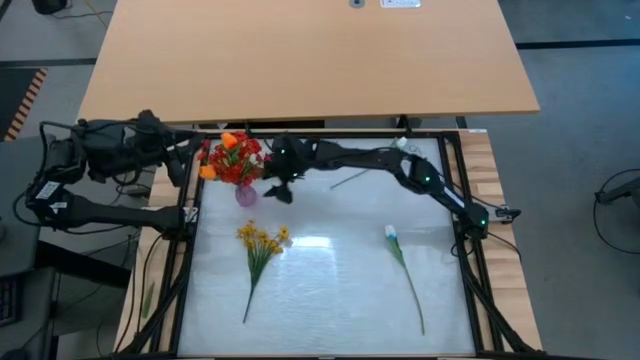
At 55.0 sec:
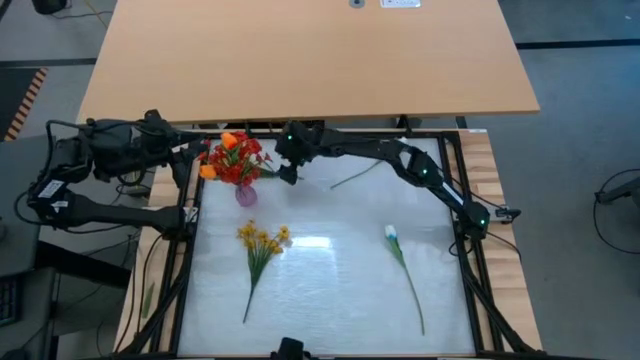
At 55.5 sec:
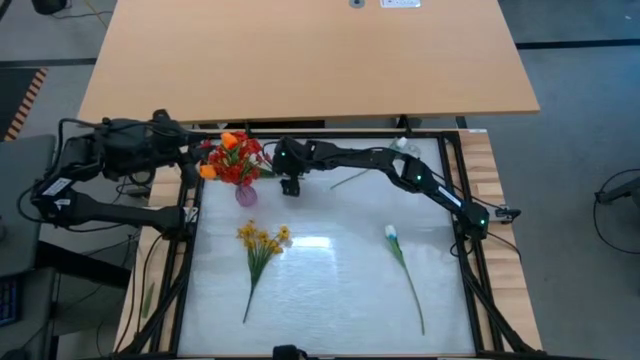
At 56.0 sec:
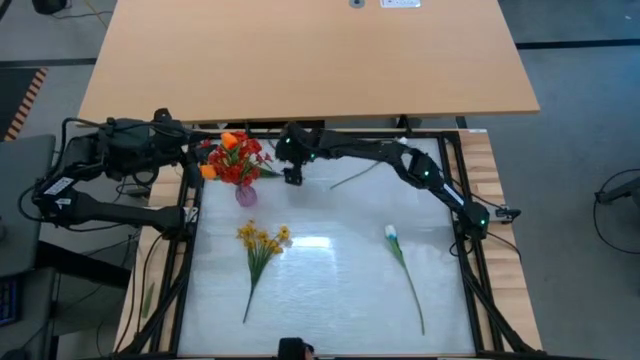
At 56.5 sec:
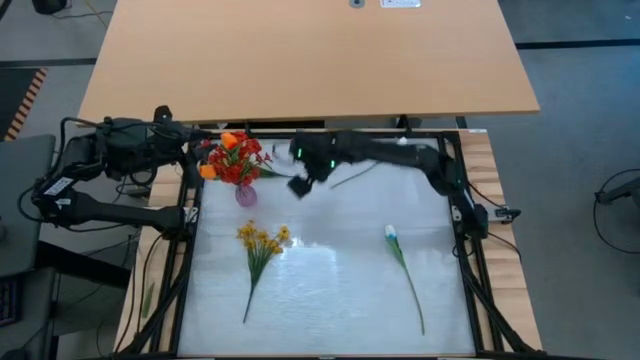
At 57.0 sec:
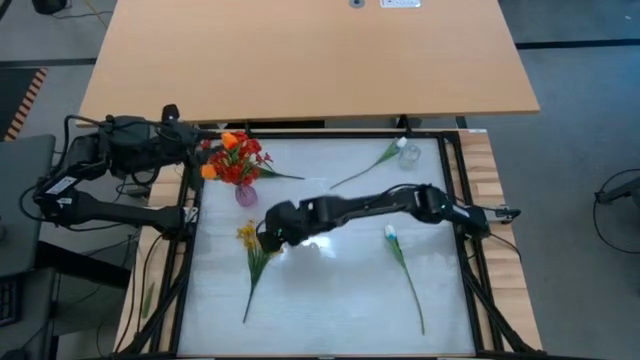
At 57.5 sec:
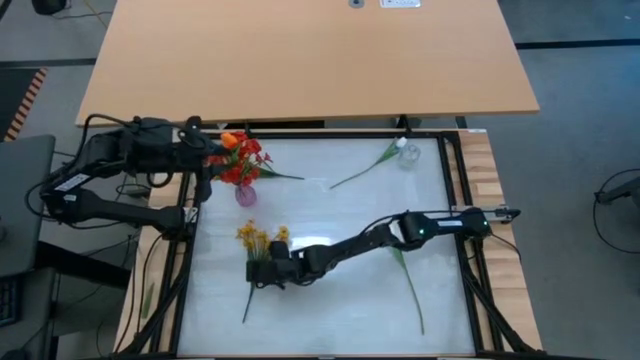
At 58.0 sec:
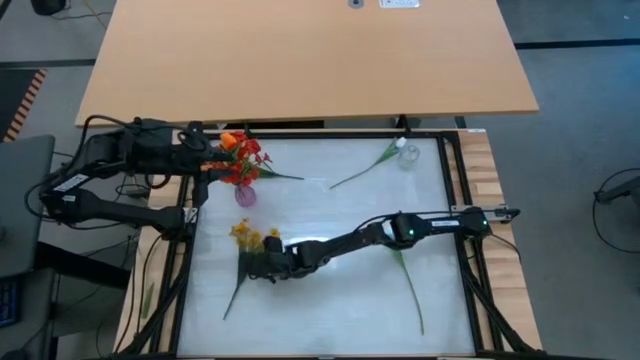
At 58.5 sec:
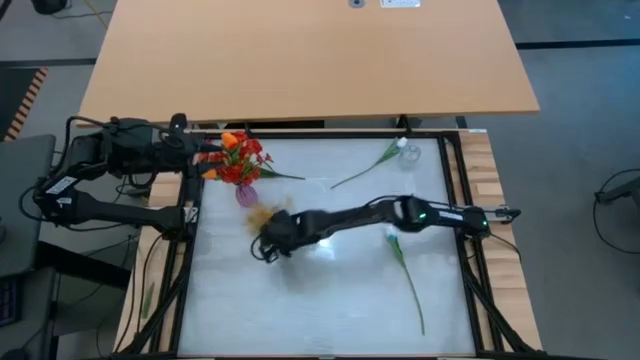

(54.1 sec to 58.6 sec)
Task: Sort flowers into vase by color
Put the bottom yellow flowers into the transparent vase

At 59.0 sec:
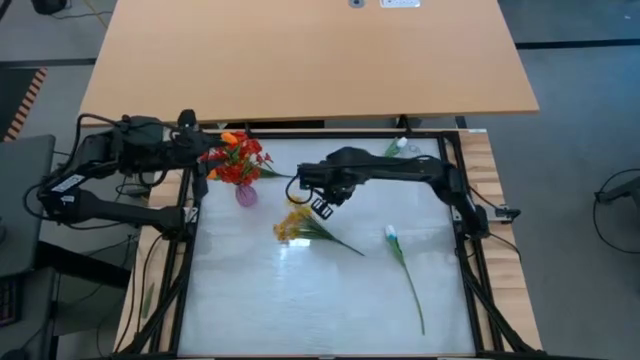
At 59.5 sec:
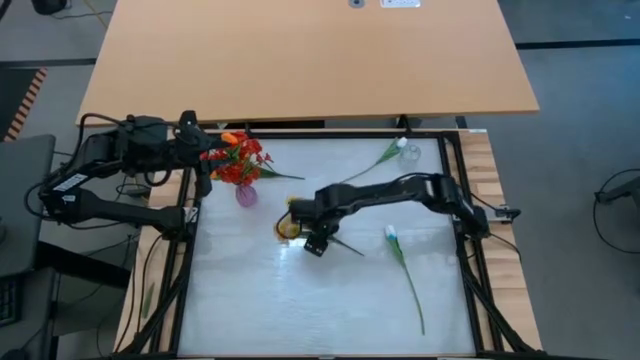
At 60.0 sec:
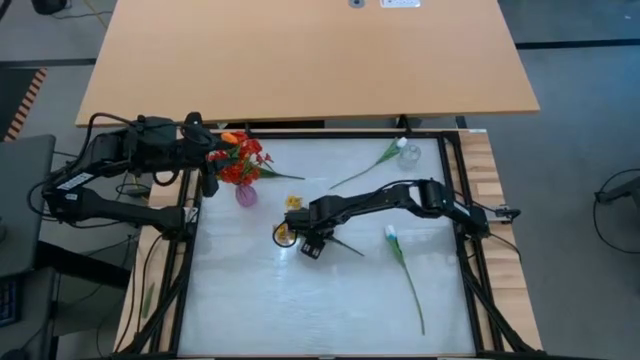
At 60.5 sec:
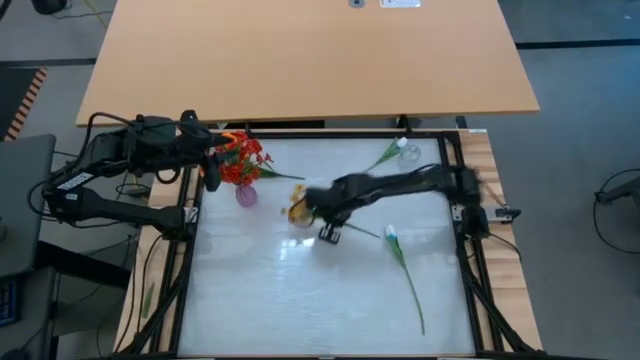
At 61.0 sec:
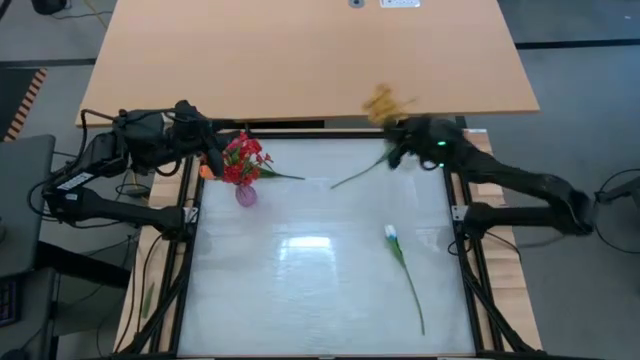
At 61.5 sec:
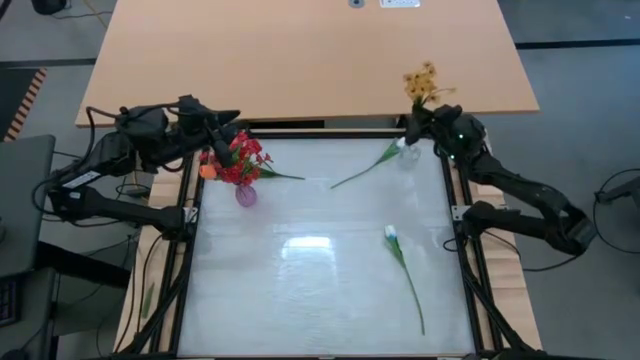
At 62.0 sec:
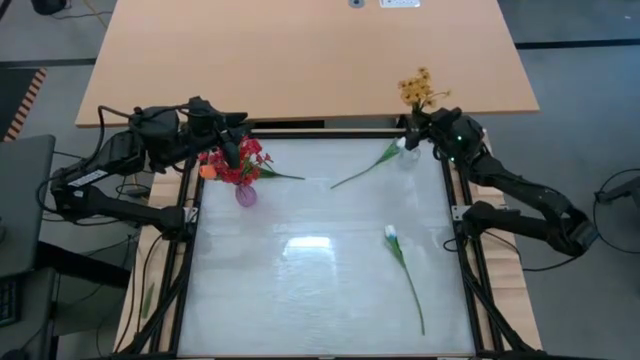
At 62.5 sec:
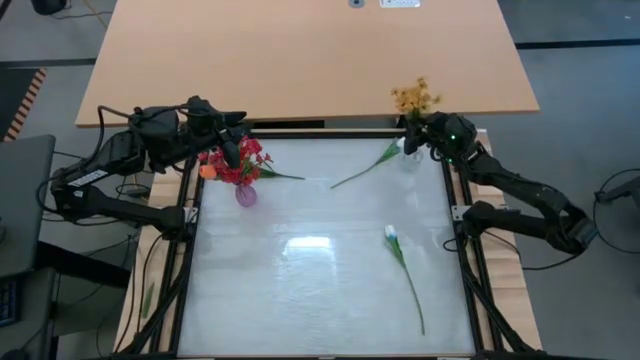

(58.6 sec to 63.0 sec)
Put the bottom yellow flowers into the transparent vase

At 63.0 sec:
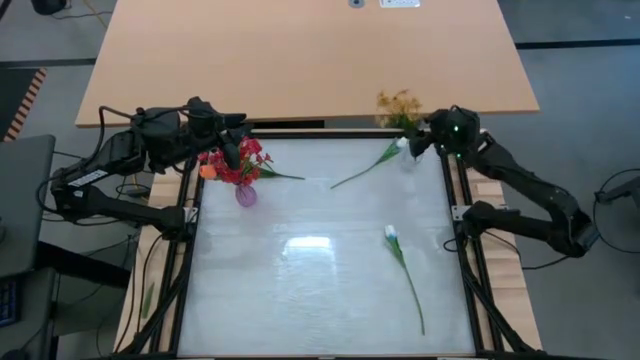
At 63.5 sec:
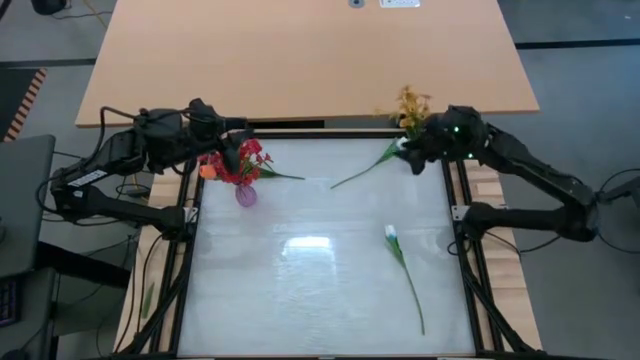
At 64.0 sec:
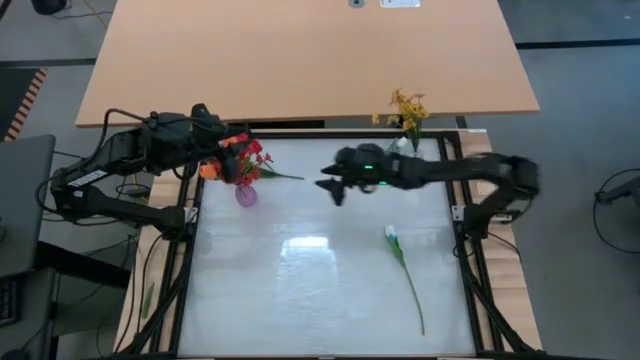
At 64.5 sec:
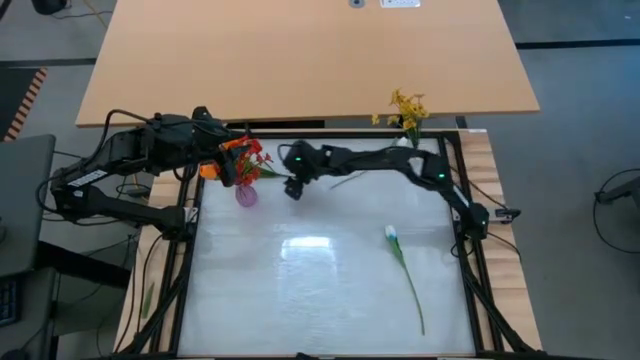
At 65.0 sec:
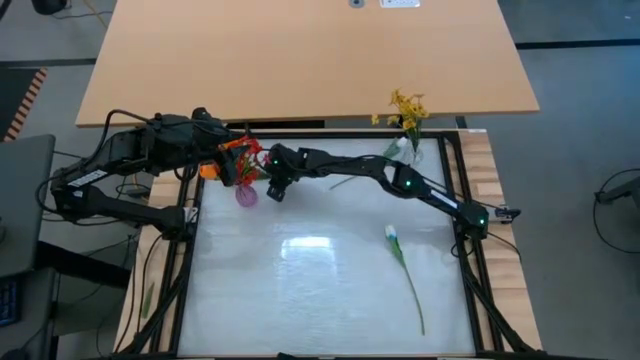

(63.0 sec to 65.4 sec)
Put the yellow flowers into the transparent vase

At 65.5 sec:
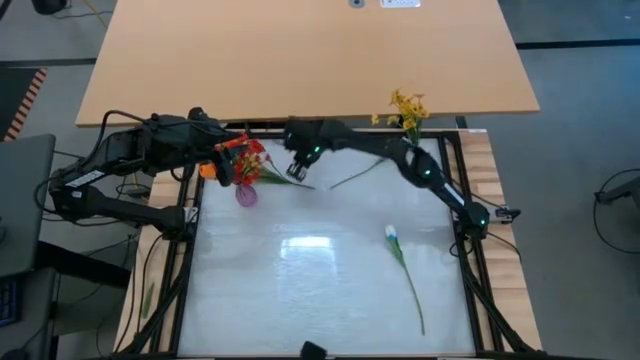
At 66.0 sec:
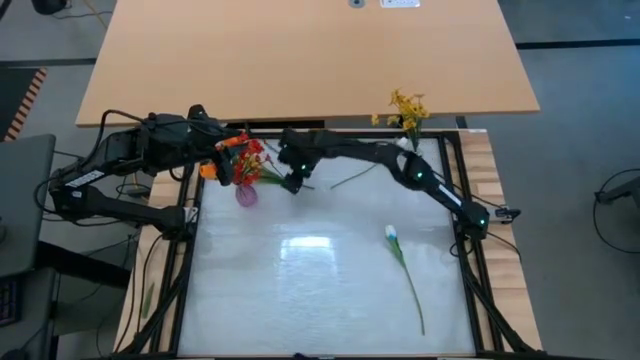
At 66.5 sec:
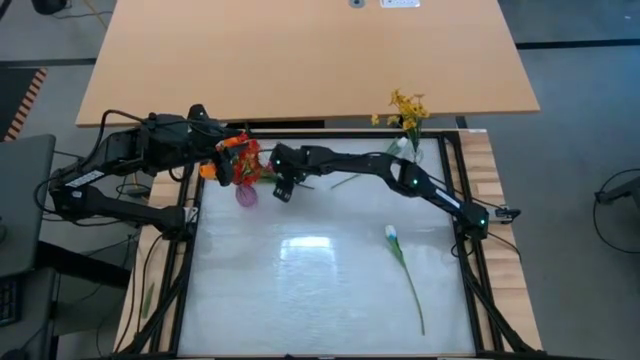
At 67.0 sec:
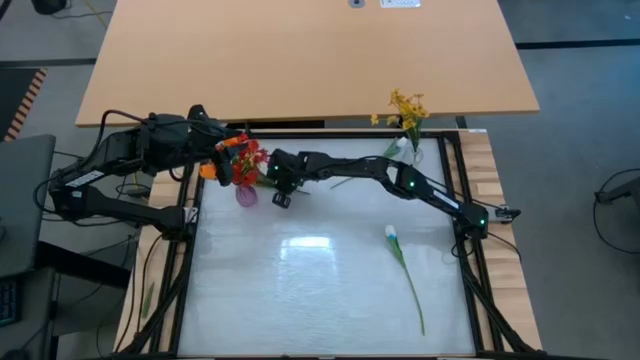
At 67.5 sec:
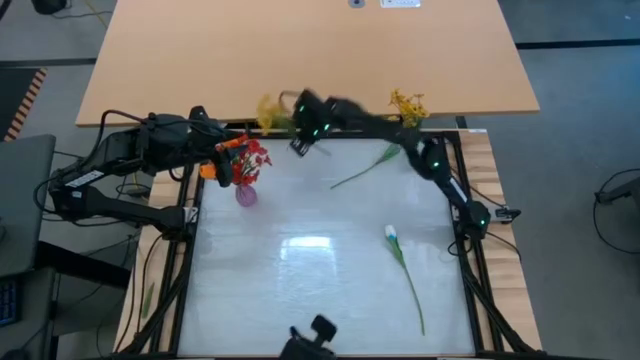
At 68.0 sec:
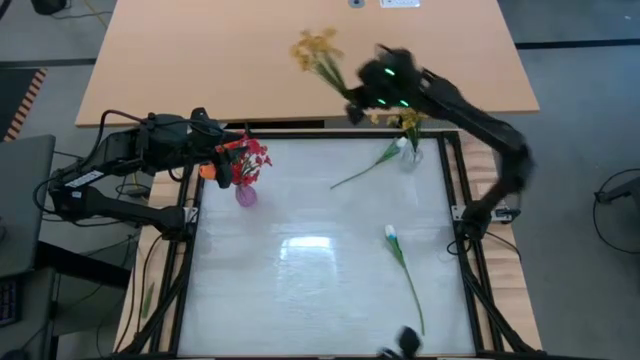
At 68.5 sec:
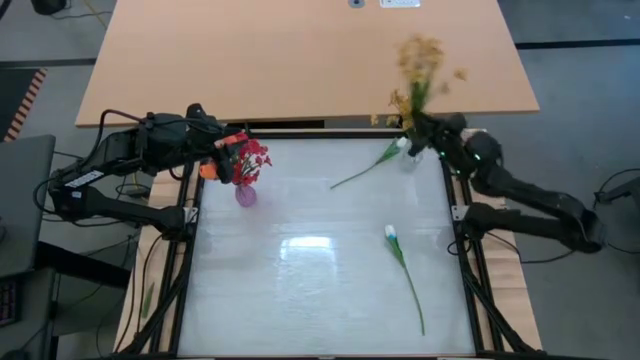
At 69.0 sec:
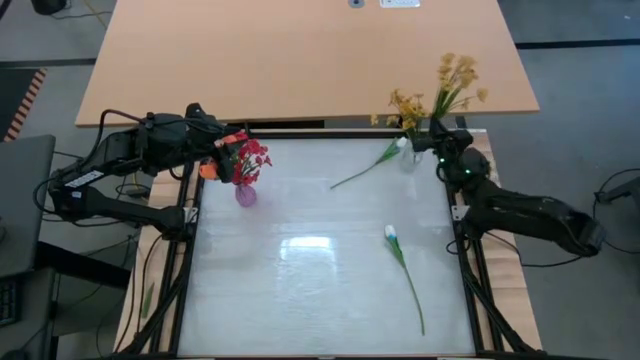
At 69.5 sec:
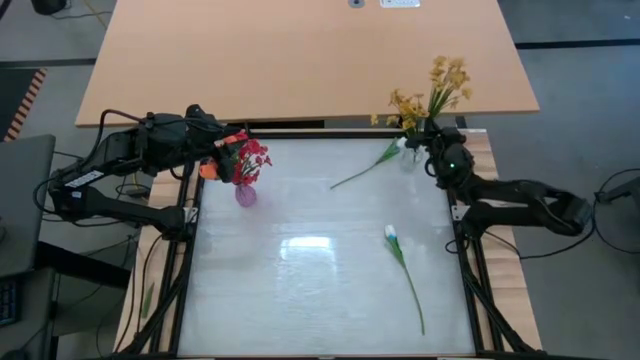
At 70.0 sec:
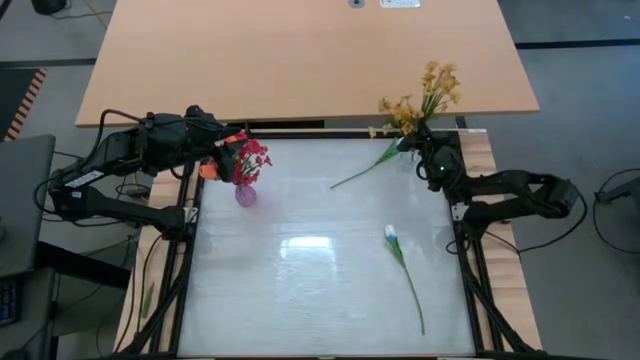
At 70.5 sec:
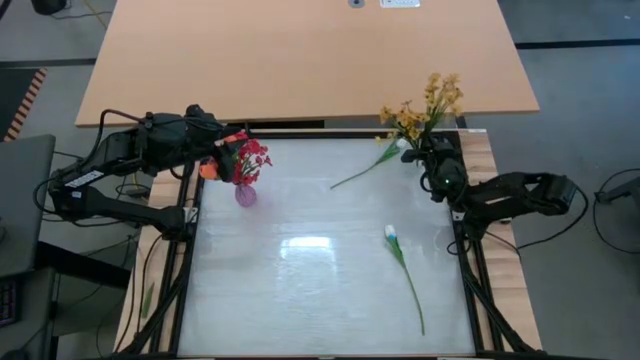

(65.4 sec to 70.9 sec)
Put the yellow flowers into the transparent vase

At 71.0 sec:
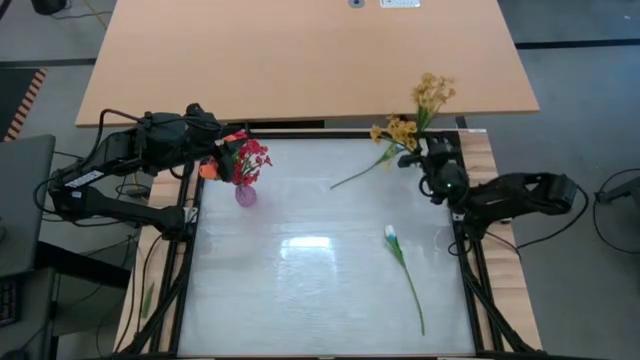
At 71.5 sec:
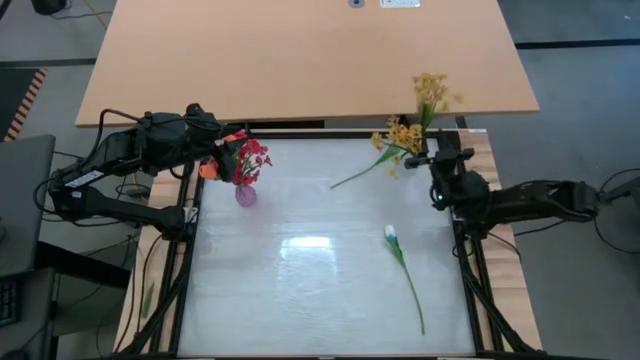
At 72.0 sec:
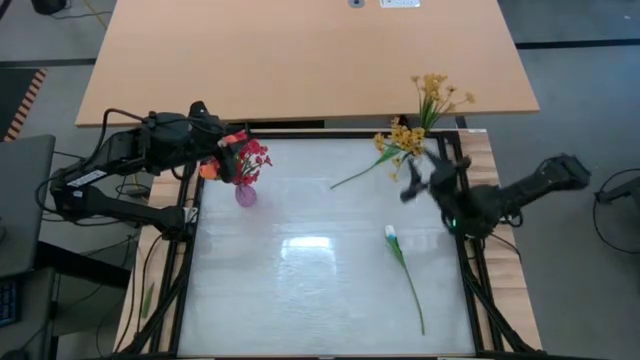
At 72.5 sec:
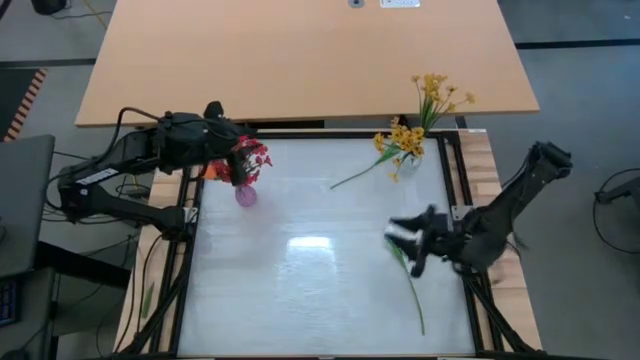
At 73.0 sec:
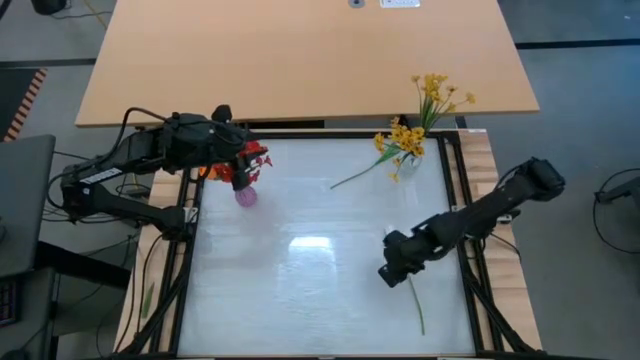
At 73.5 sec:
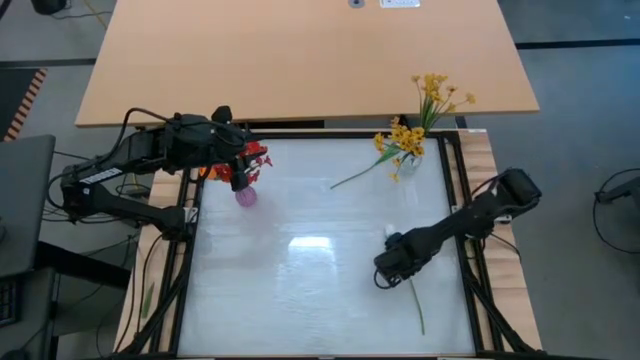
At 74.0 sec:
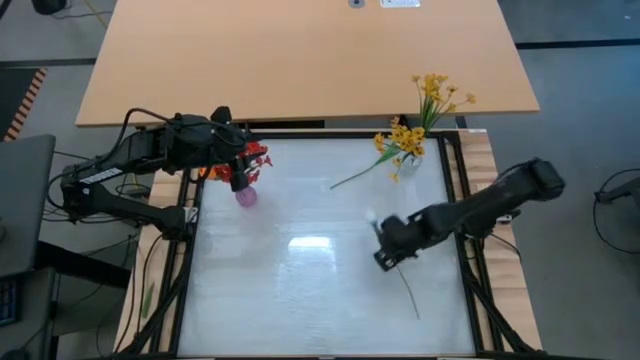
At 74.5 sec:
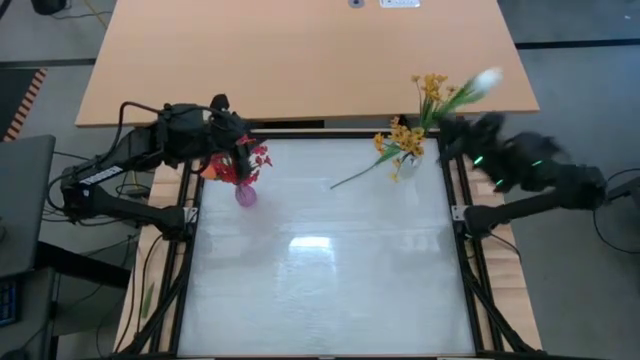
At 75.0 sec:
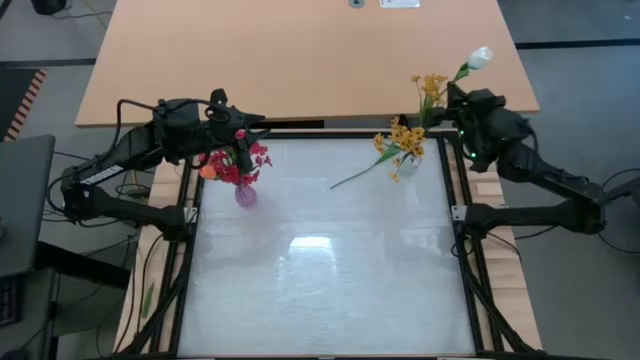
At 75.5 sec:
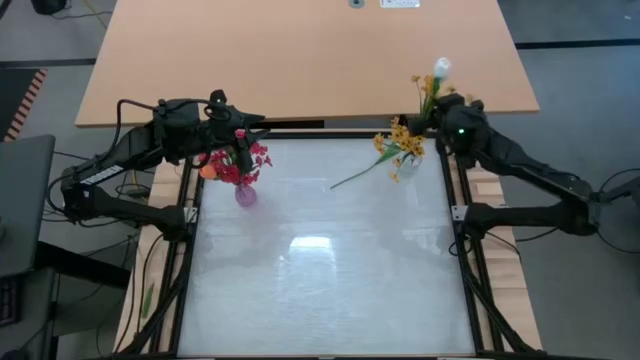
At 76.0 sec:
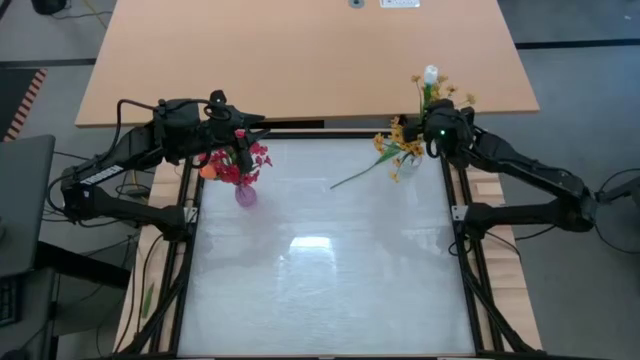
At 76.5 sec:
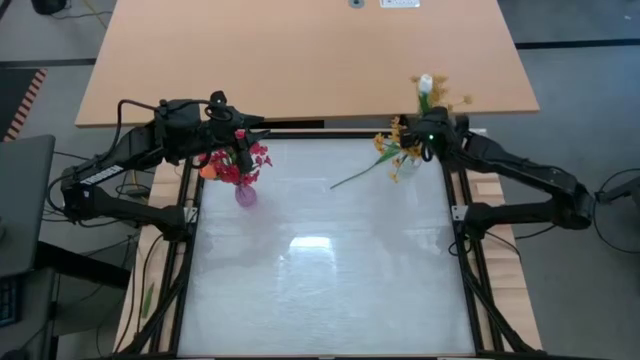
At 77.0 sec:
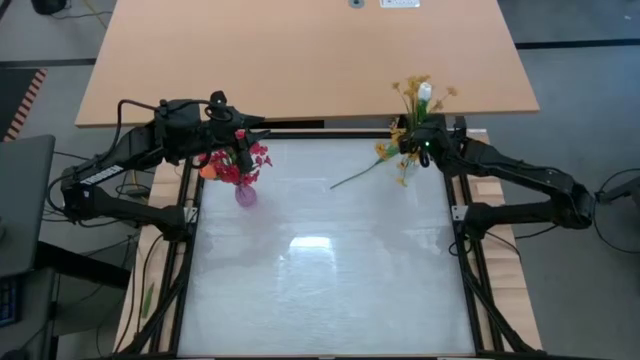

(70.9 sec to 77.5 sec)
Put the bottom white tulip into the transparent vase
